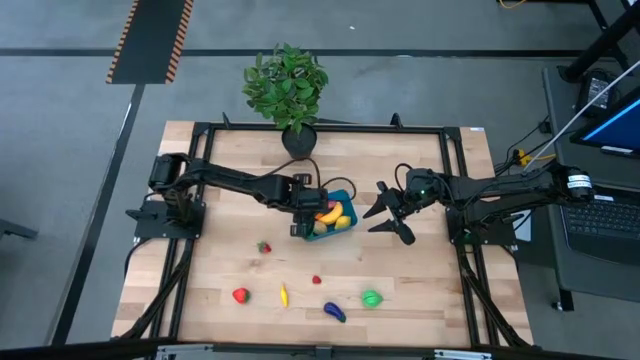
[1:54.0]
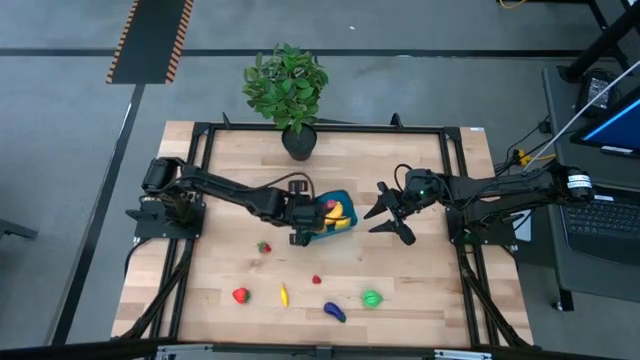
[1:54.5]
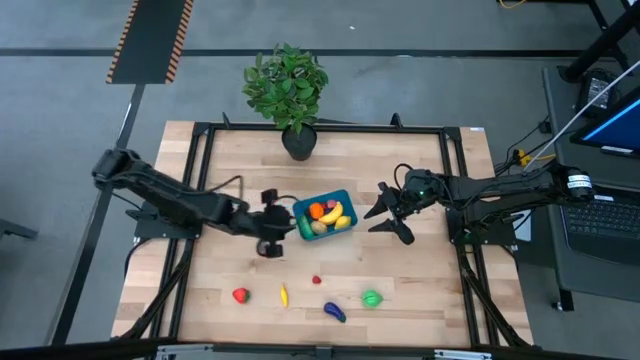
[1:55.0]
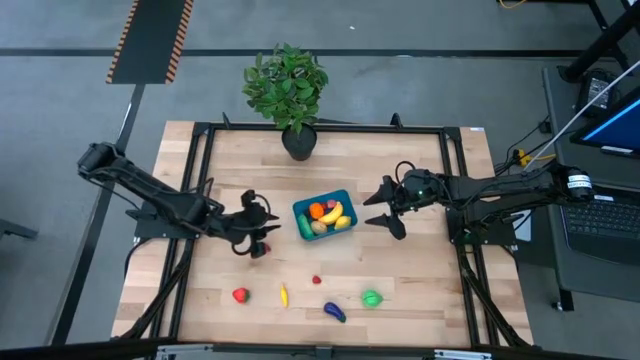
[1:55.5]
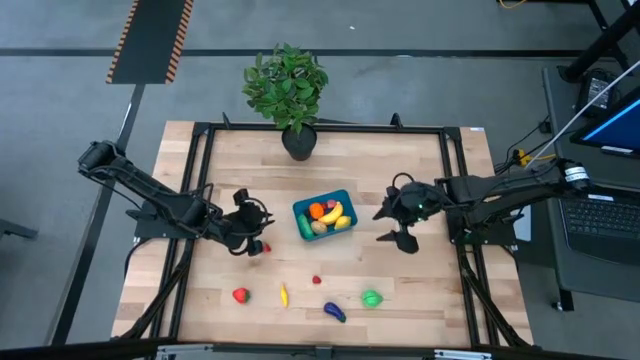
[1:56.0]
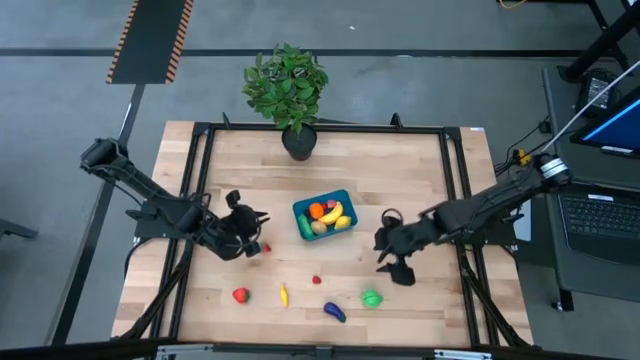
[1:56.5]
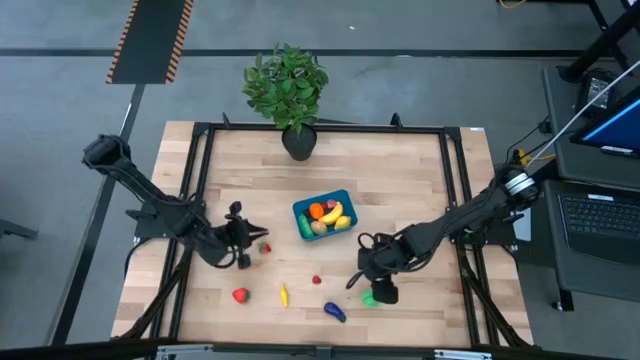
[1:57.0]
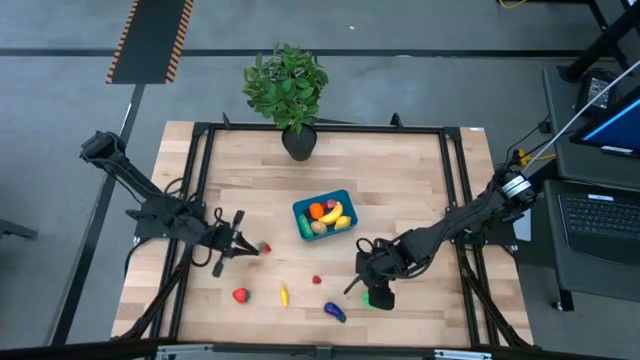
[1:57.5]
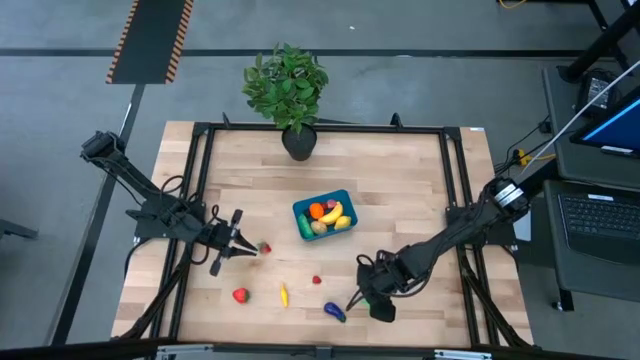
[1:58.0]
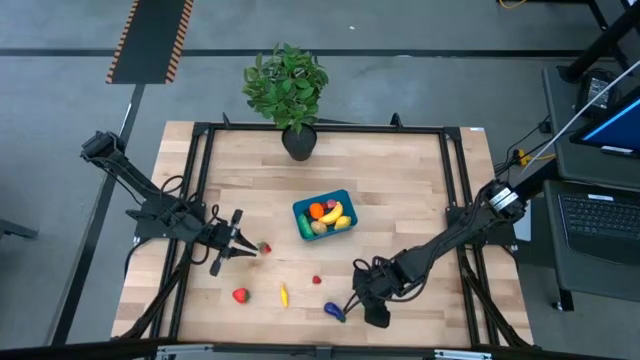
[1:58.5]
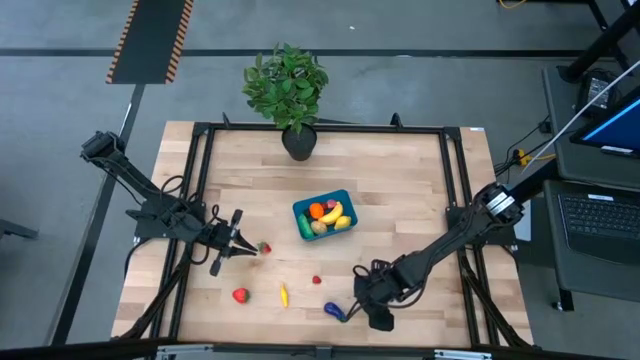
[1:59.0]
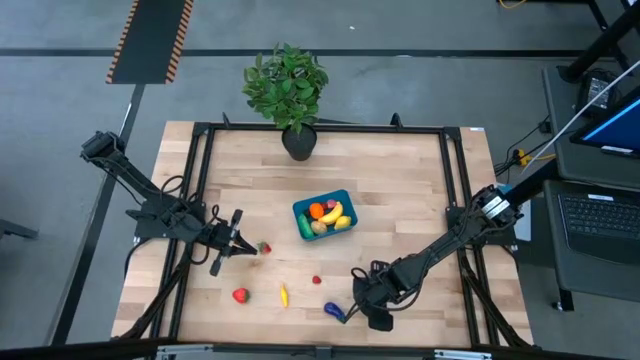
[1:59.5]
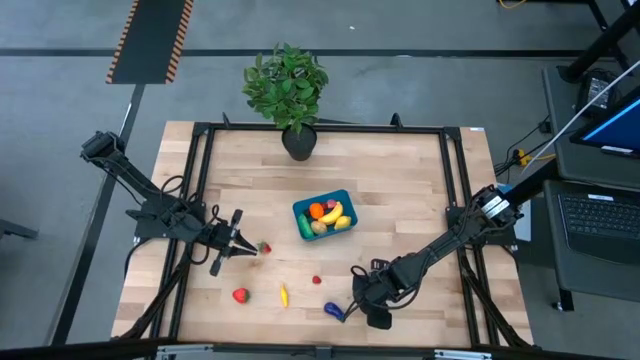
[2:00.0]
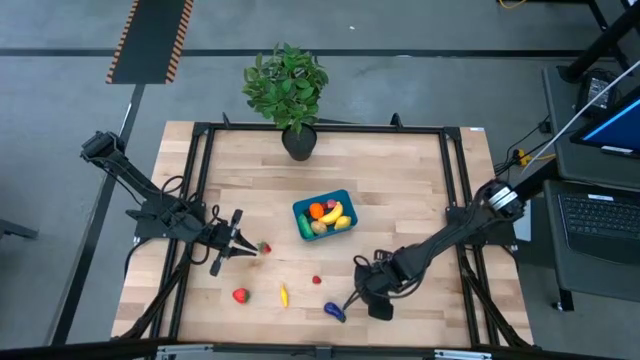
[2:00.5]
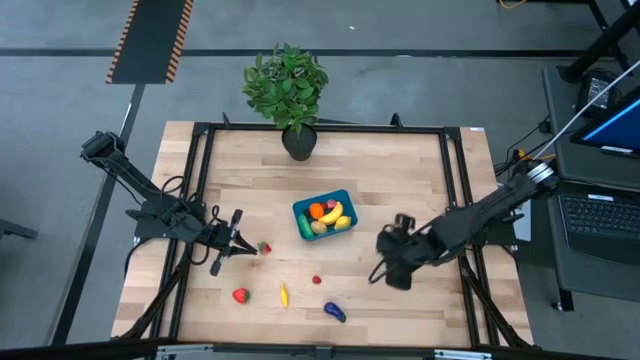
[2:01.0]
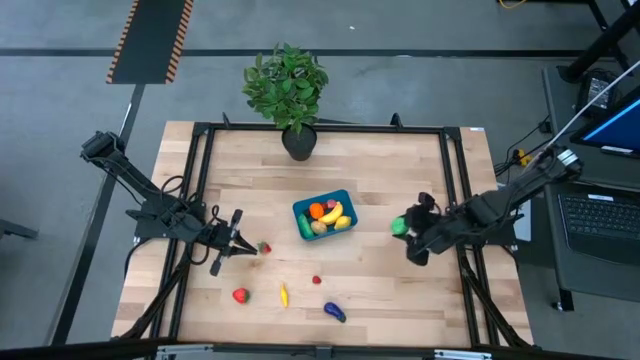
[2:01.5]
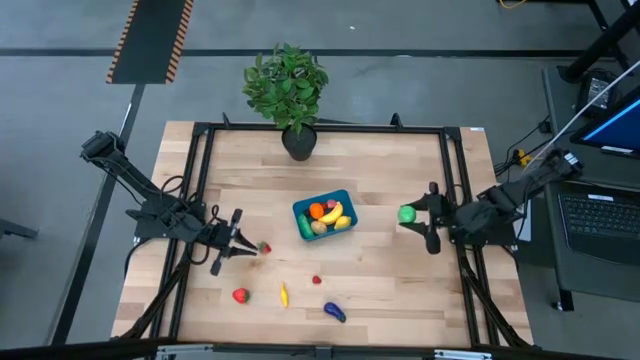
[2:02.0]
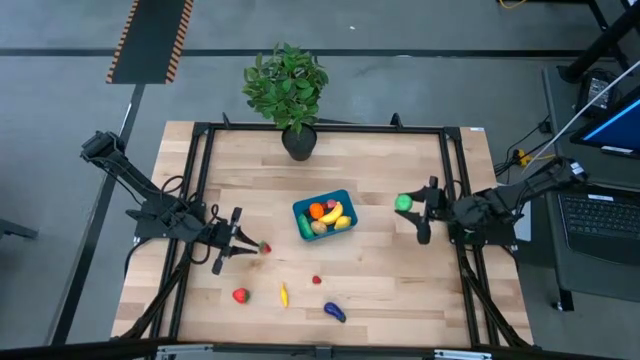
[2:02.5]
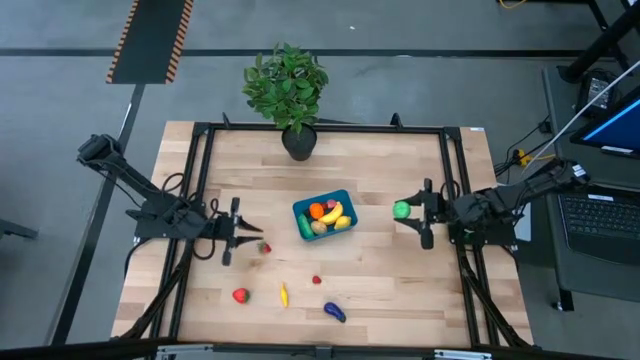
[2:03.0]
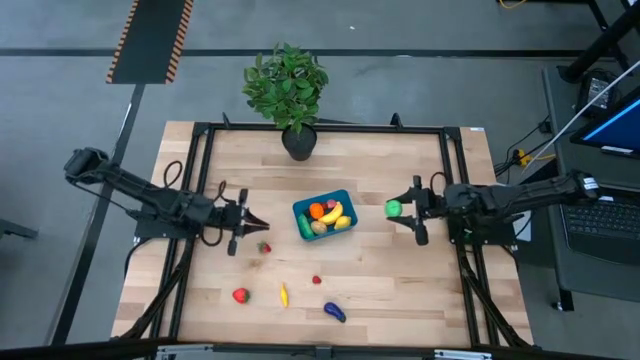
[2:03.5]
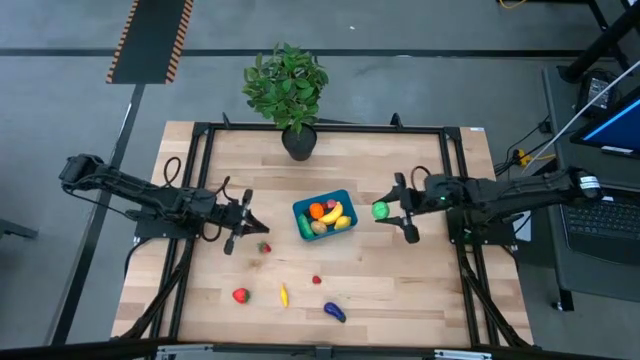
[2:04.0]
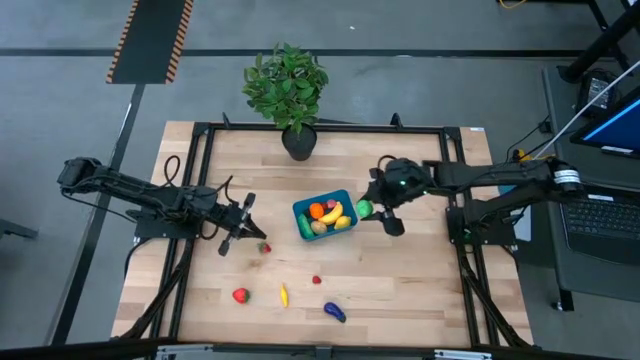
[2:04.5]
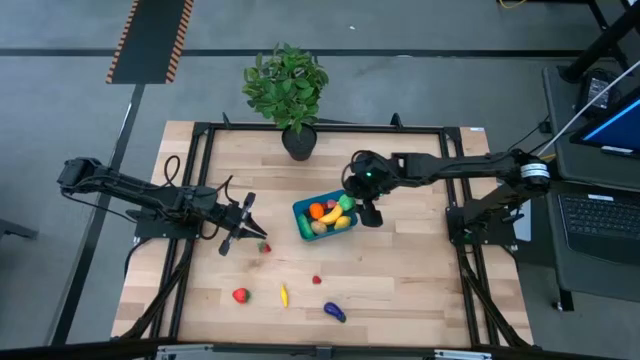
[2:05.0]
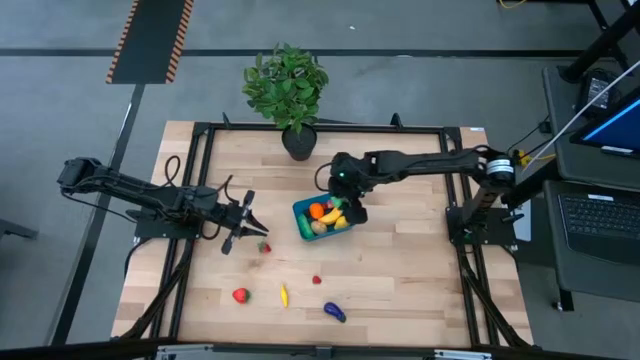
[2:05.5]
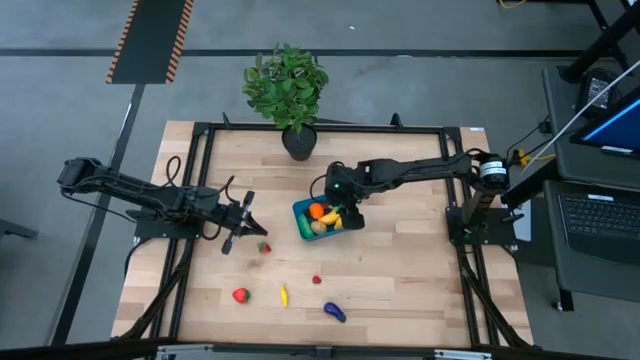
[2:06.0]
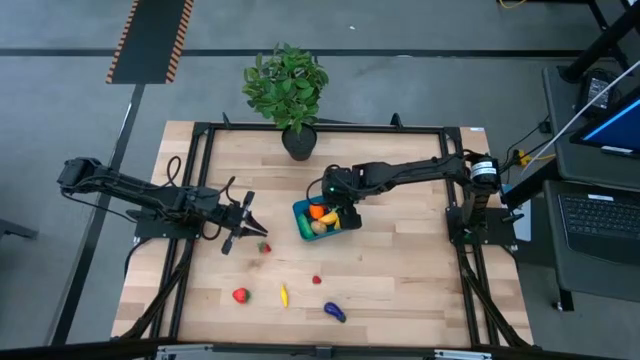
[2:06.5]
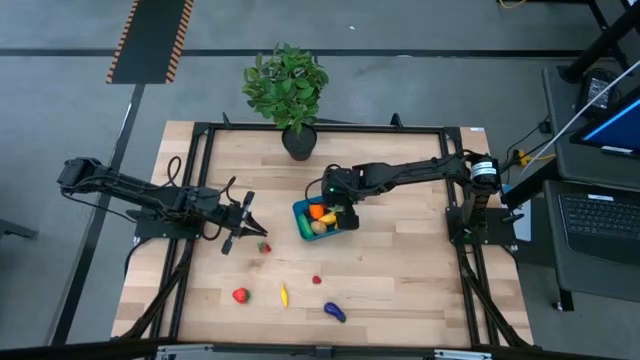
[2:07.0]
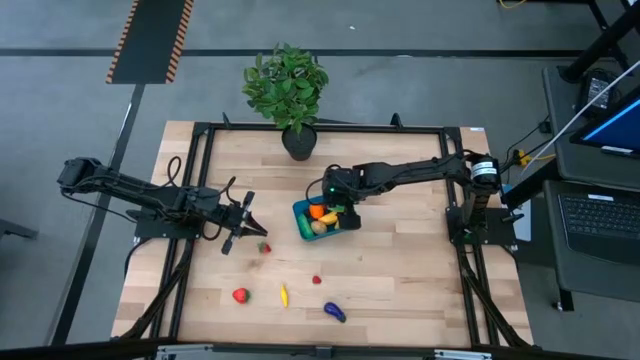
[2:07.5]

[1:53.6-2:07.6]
Task: Pick and placing Produce into tupperware
Put the green pear into the blue bin

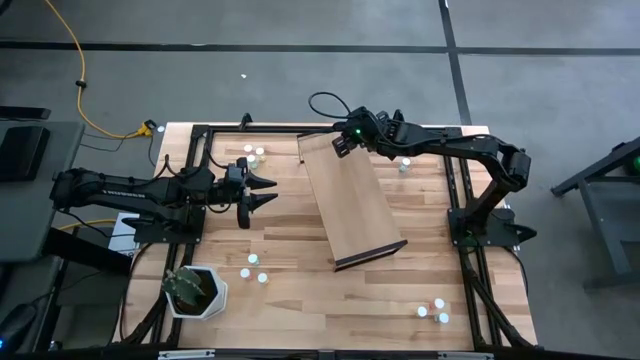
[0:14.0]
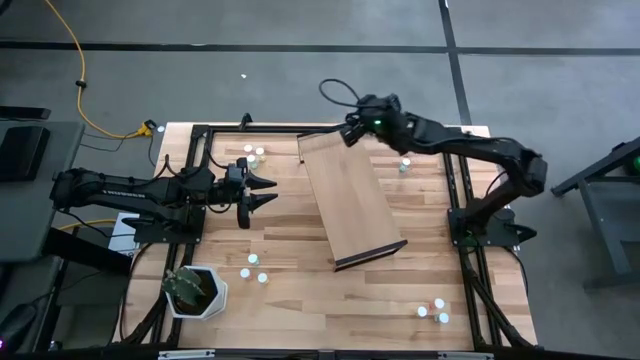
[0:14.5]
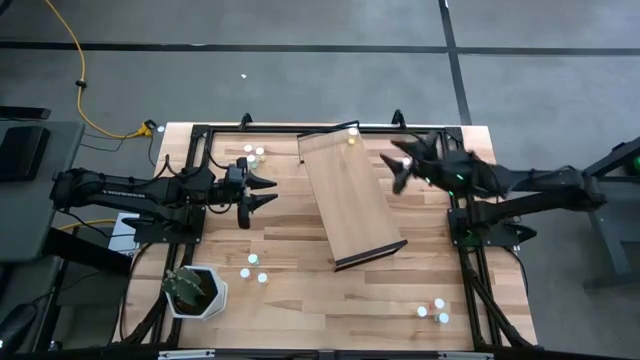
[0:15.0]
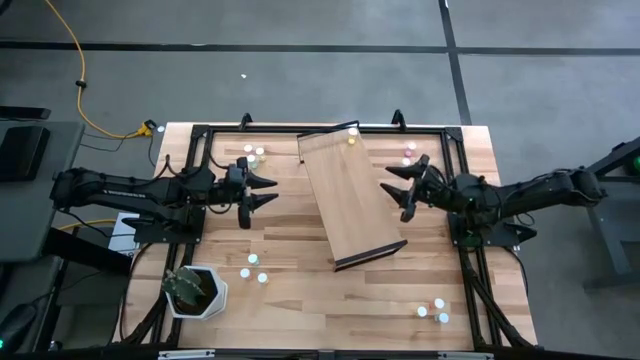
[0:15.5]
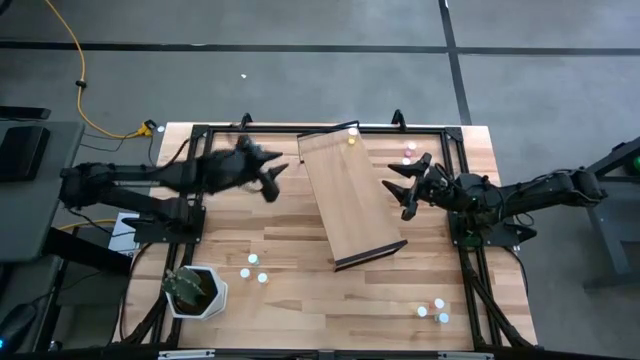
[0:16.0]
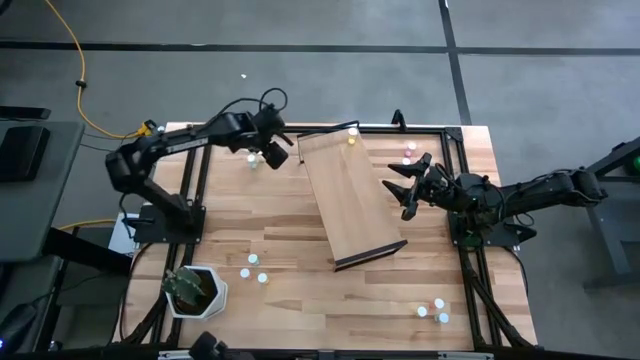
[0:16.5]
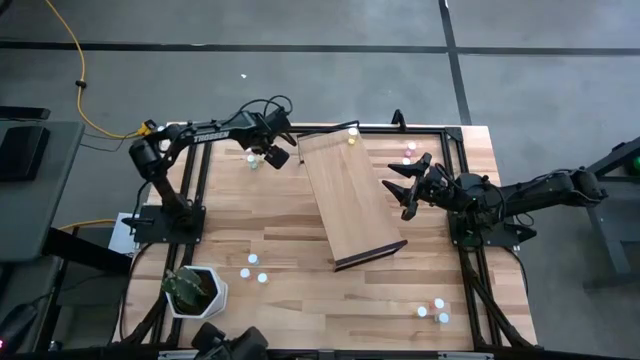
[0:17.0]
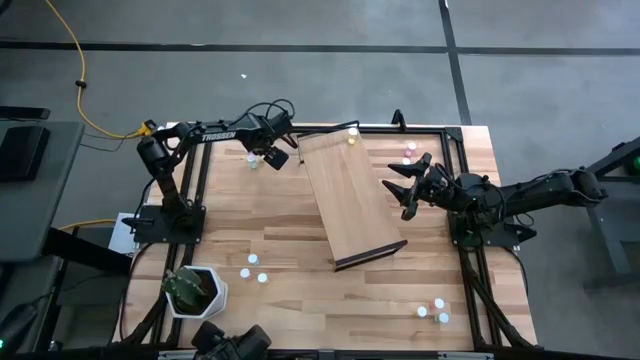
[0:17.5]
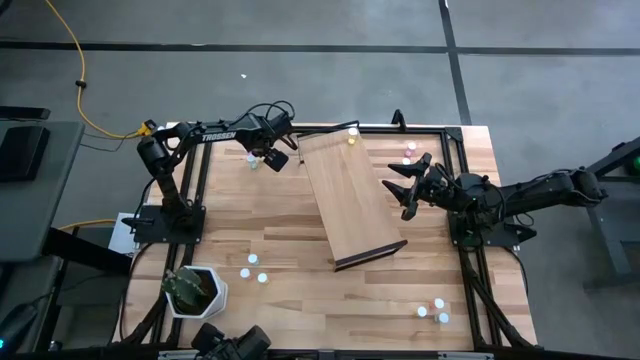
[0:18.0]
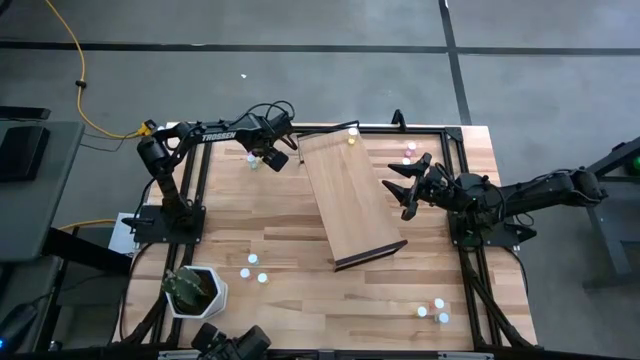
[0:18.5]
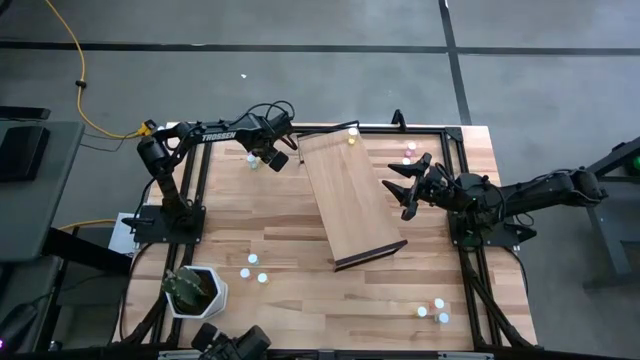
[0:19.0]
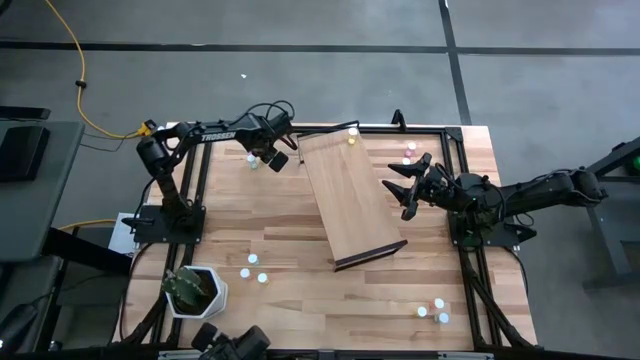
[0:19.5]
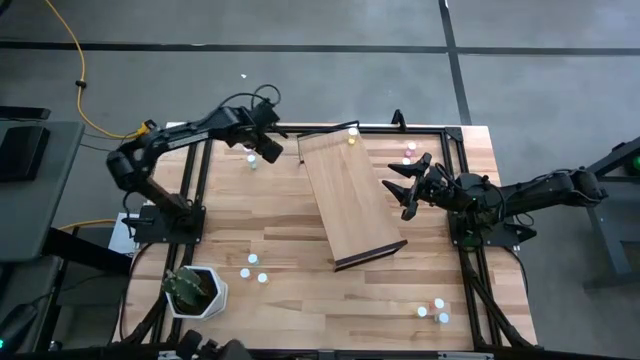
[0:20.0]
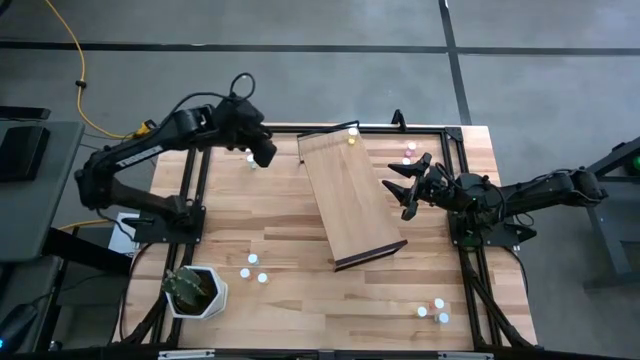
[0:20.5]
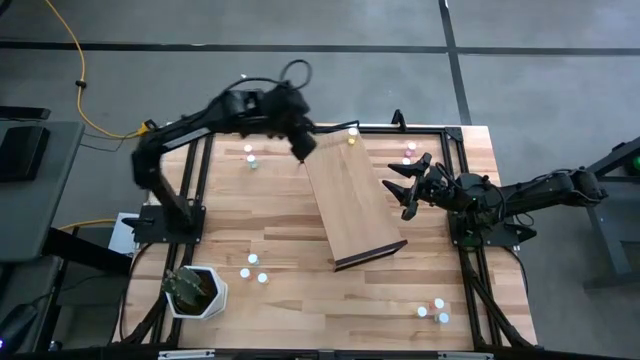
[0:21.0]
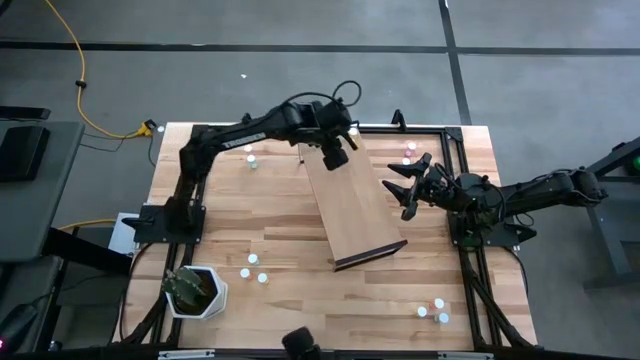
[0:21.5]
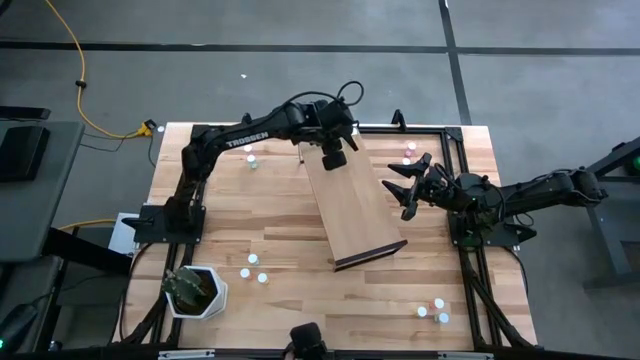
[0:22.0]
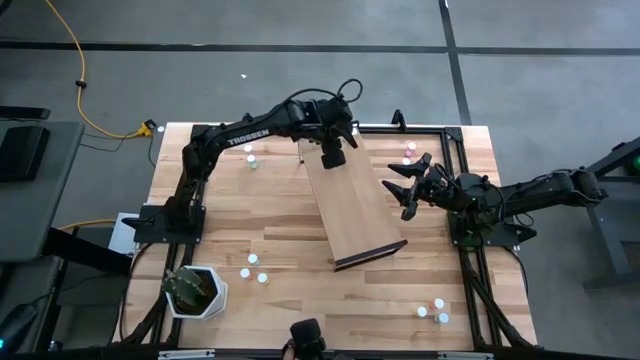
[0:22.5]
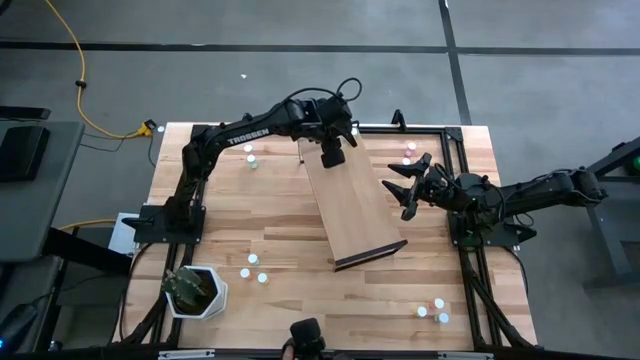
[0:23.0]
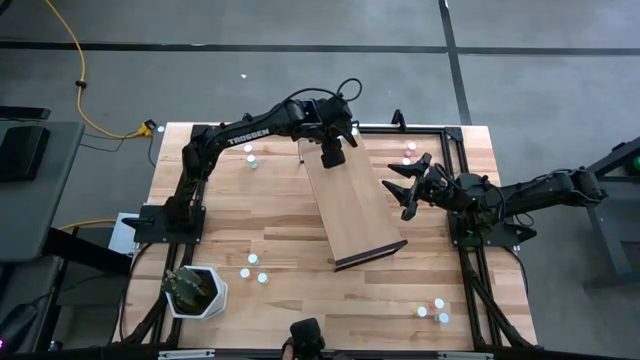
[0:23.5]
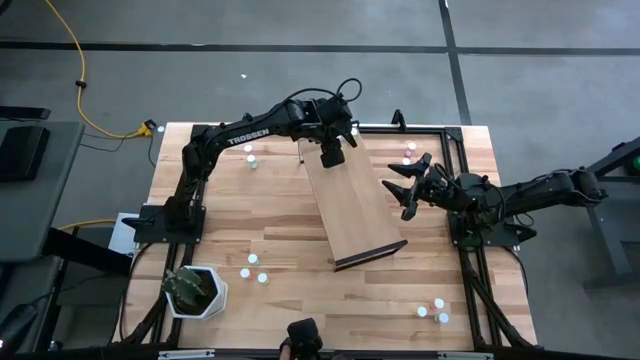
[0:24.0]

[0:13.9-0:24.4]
Task: Pick and place medicine bottles onto shelf by color
Put the yellow pill bottle on the shelf aligned with the other yellow pill bottle
